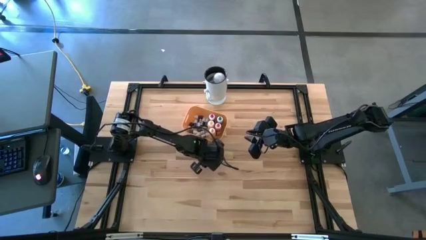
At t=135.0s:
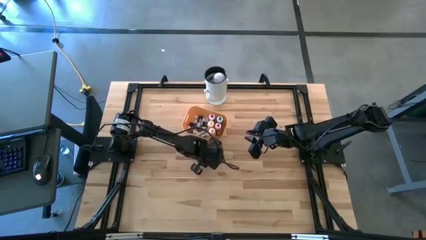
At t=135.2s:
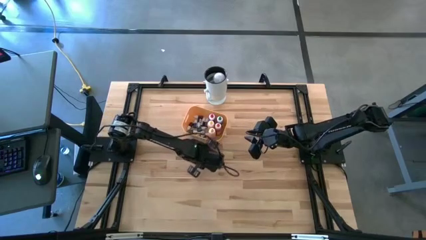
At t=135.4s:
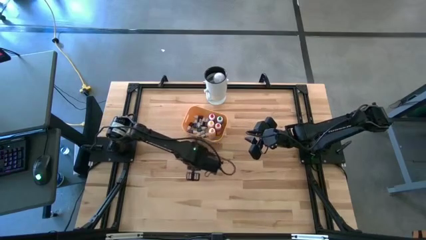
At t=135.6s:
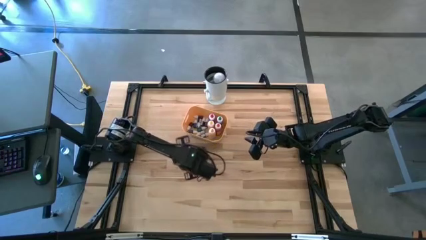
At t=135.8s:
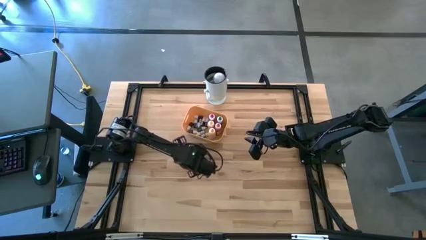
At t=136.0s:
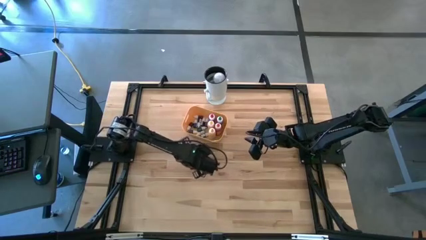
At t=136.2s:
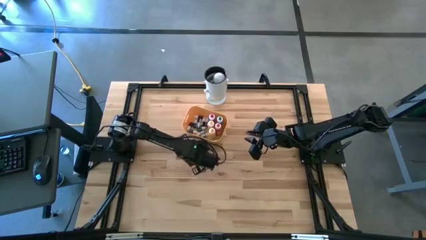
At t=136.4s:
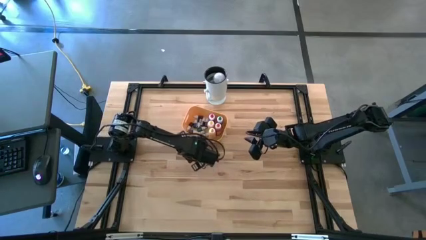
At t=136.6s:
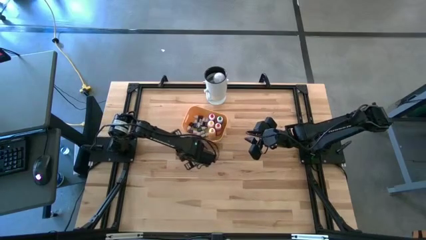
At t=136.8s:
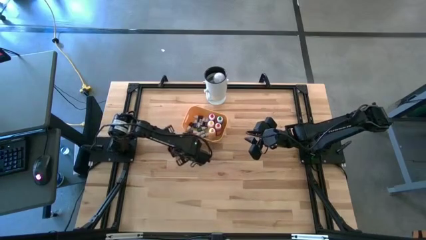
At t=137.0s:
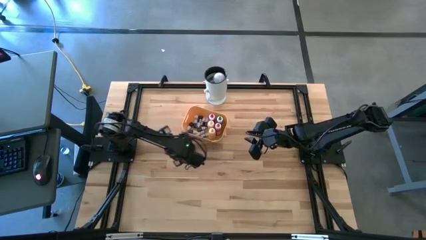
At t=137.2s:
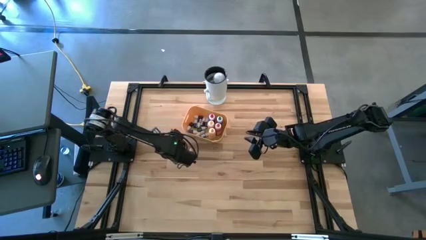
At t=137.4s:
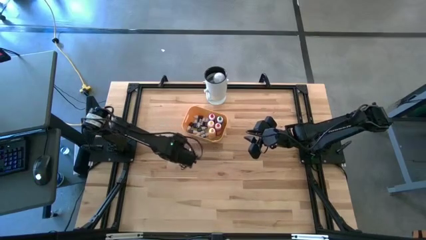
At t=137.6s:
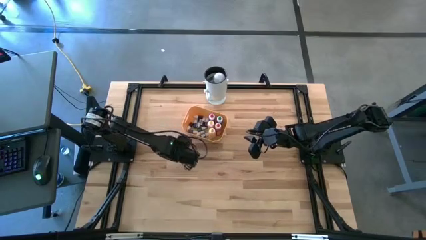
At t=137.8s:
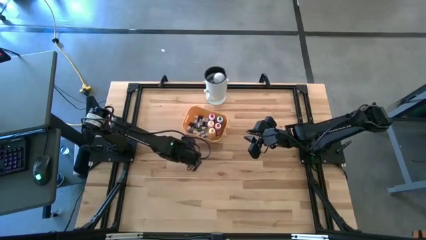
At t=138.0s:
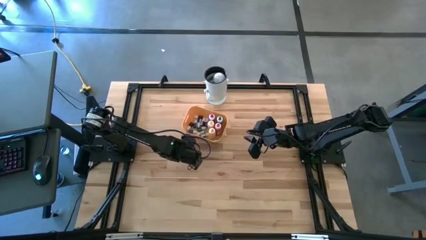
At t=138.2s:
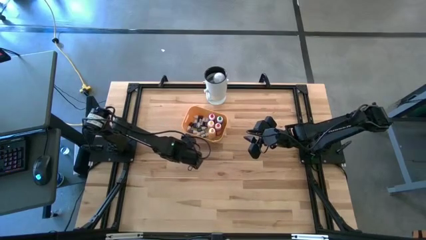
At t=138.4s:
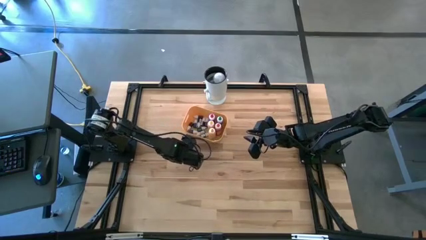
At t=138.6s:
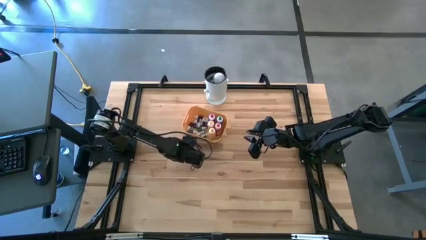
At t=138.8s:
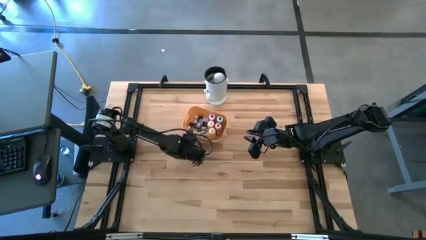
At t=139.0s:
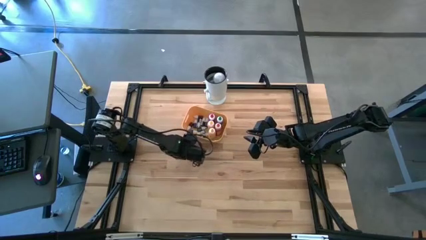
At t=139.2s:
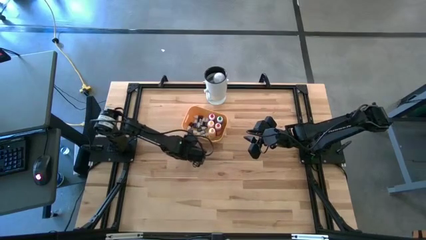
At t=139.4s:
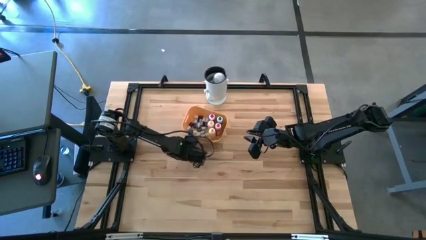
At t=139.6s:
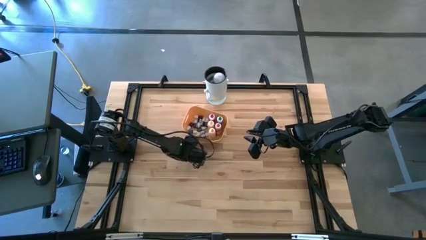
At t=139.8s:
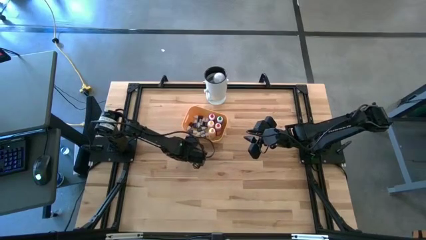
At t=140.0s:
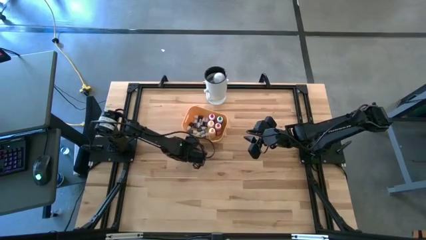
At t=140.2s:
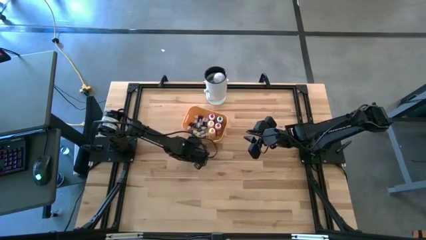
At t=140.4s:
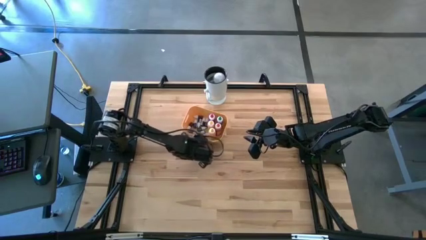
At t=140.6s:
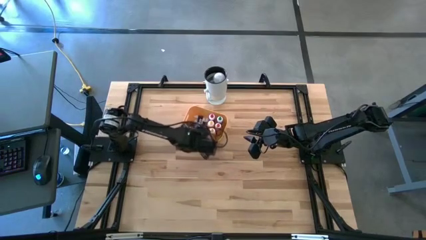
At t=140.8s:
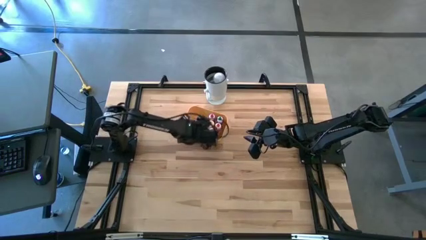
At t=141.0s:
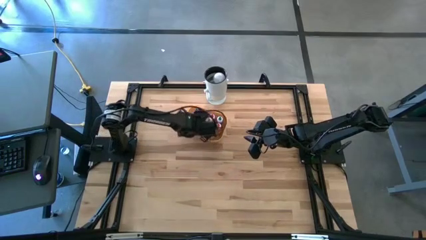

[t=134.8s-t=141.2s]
Task: Pick & Place food coloring
Put the dark blue food coloring bottle into the yellow bin

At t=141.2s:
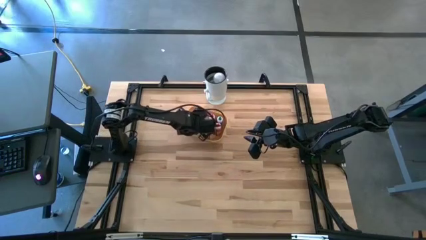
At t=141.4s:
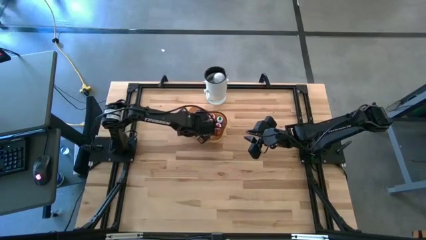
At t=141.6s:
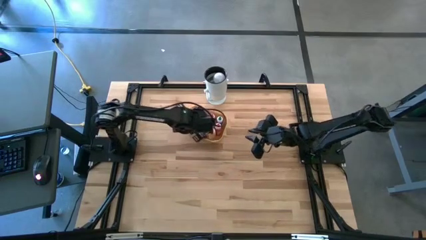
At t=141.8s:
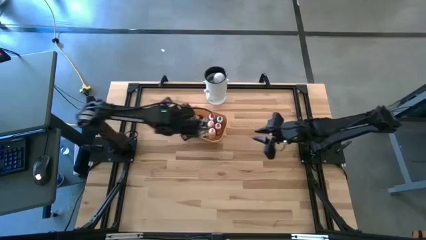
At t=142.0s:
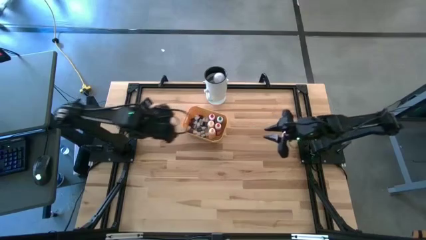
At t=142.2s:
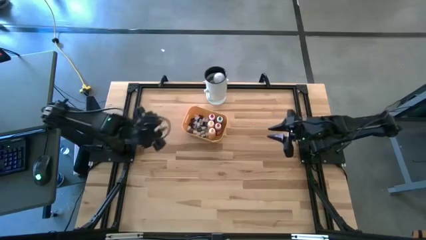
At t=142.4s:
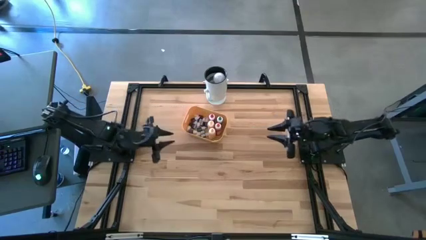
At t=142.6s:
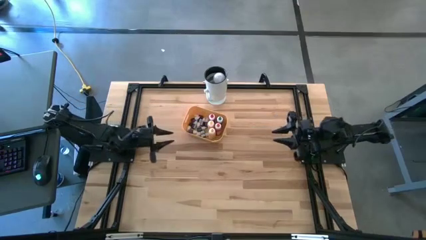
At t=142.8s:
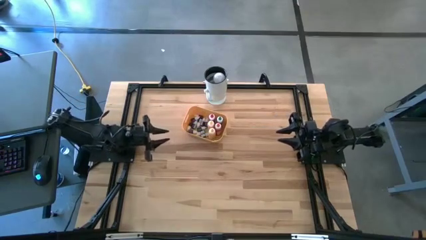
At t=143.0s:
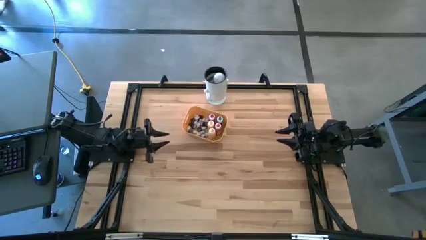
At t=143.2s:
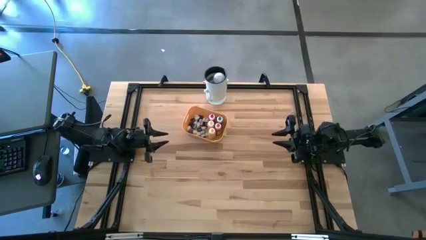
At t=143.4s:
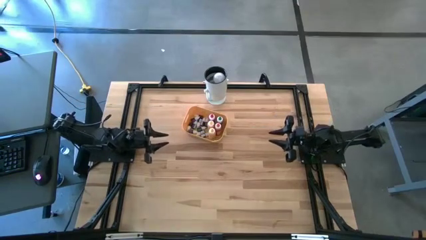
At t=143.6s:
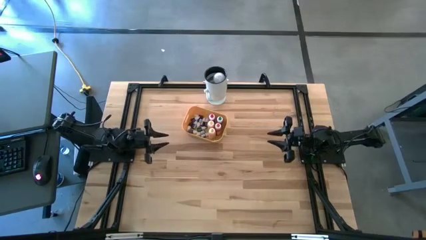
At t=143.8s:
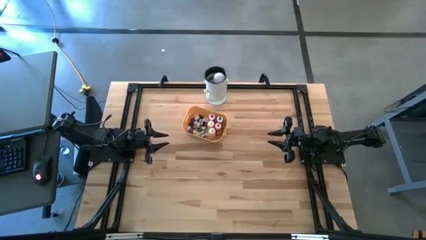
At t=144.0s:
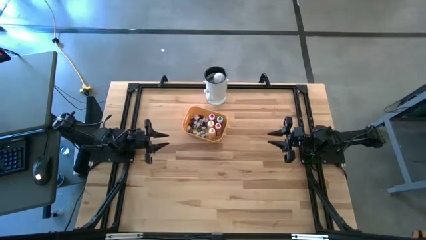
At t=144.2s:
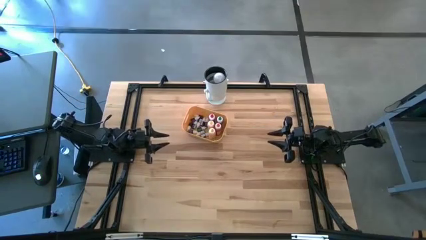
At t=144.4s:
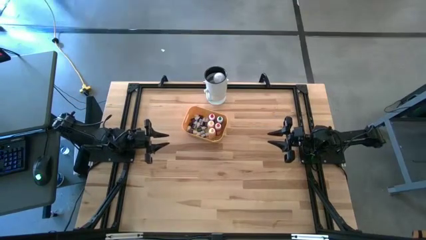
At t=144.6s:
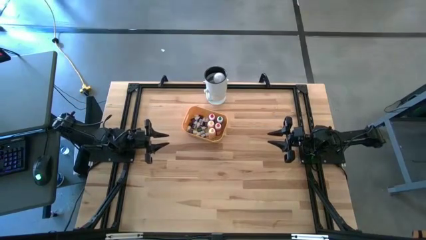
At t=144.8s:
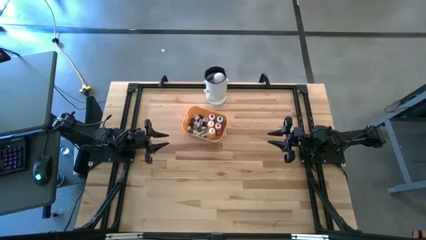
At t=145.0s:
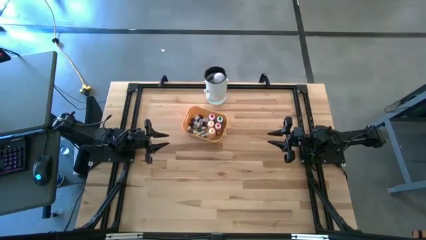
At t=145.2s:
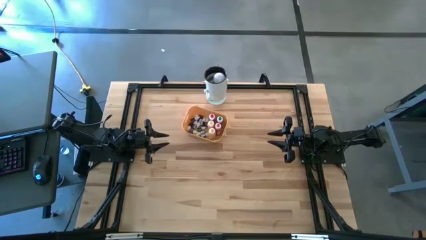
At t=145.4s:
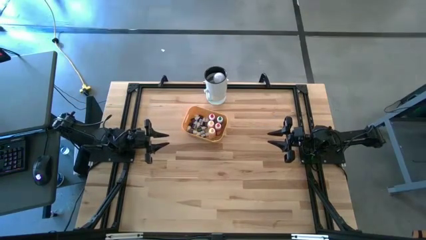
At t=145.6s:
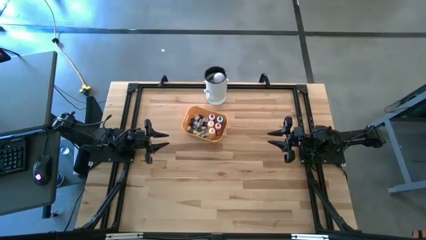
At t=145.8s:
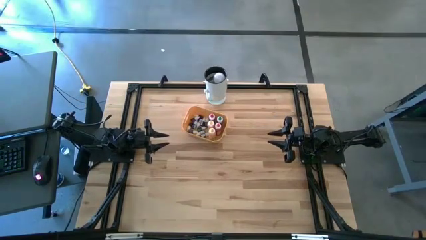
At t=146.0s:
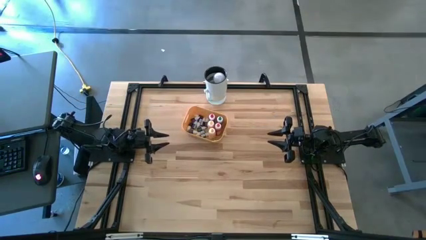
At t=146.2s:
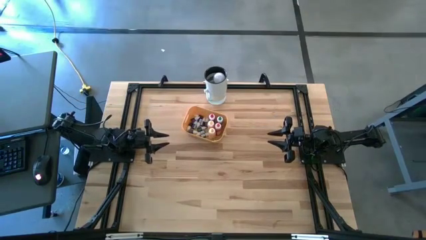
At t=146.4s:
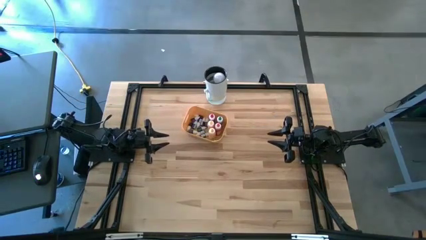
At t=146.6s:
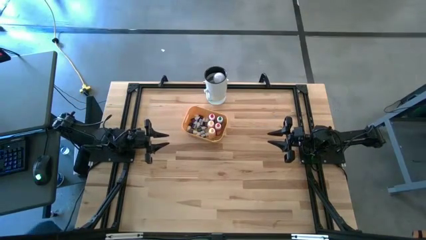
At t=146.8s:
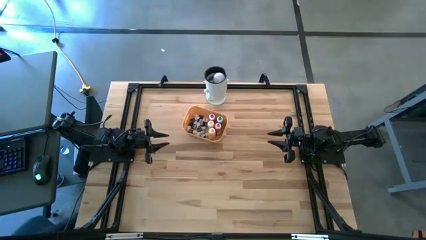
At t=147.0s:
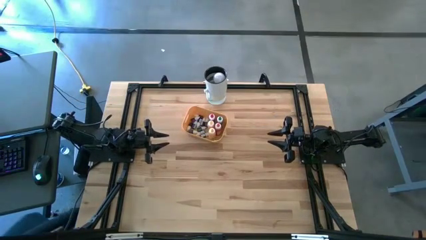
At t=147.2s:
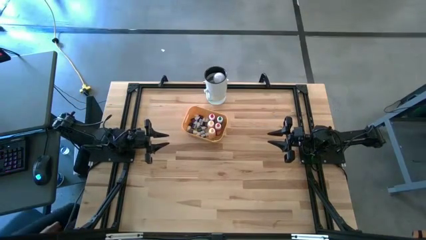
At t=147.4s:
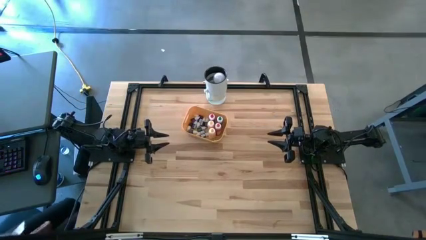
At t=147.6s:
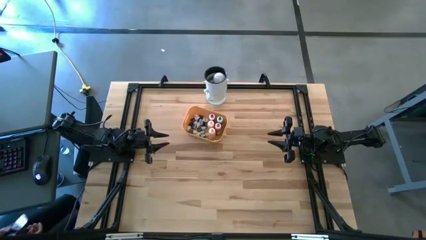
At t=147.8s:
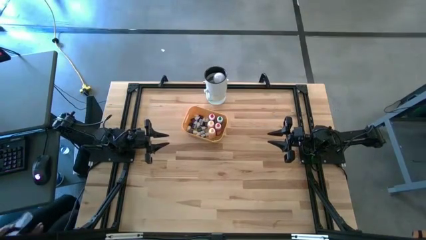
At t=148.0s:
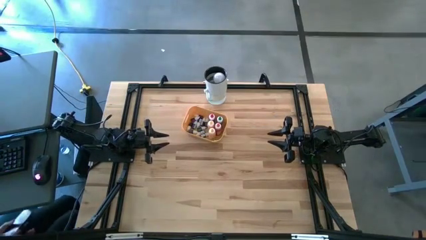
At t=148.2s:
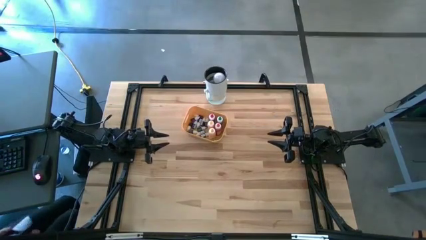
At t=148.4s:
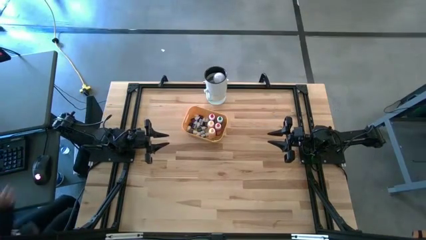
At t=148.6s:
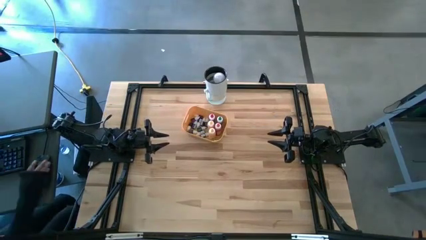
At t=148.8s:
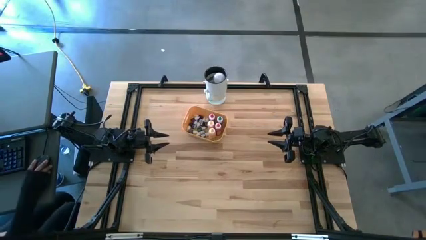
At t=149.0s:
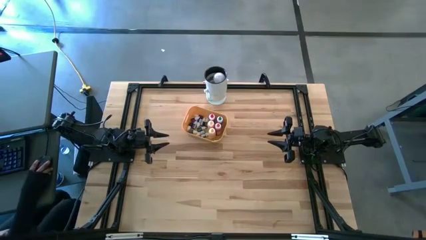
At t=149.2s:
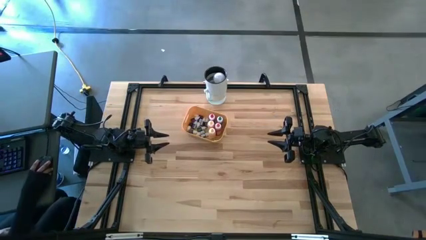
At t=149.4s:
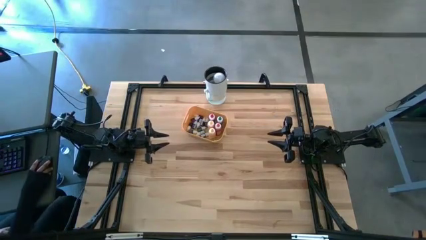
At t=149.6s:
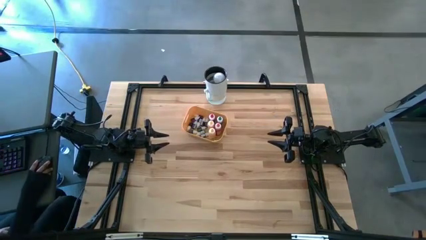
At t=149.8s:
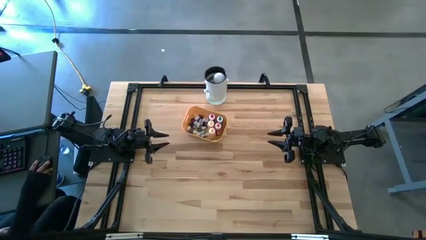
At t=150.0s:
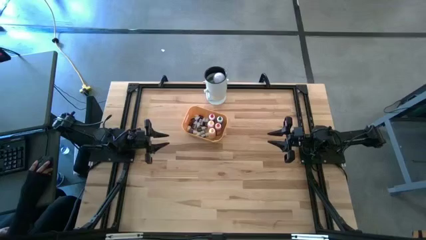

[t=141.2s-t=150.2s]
Return to Home Position
